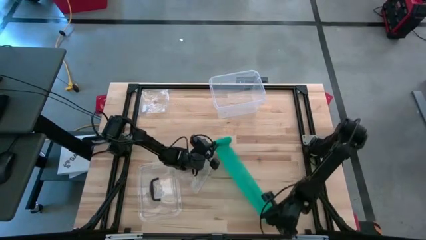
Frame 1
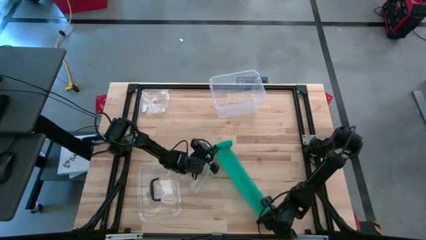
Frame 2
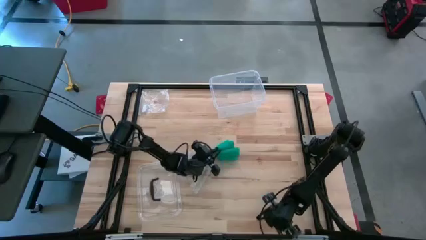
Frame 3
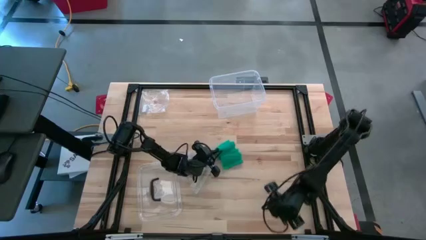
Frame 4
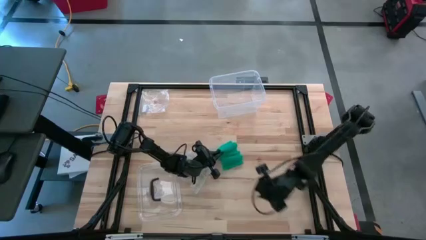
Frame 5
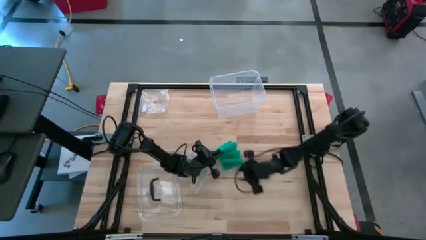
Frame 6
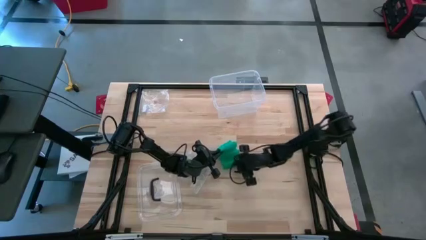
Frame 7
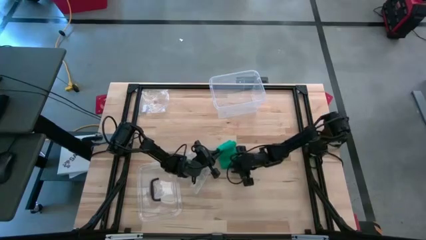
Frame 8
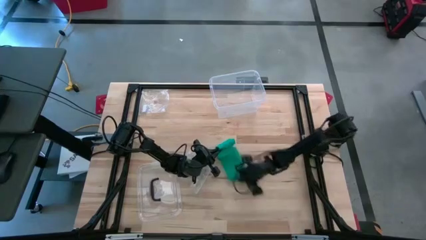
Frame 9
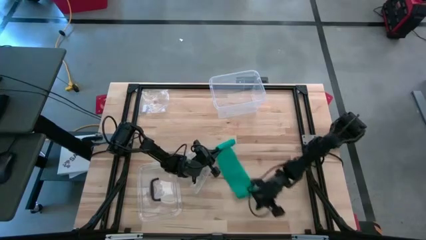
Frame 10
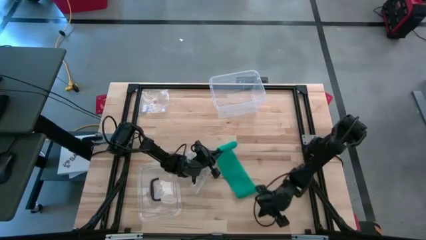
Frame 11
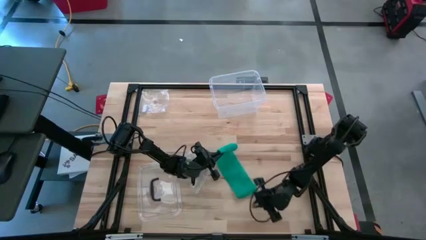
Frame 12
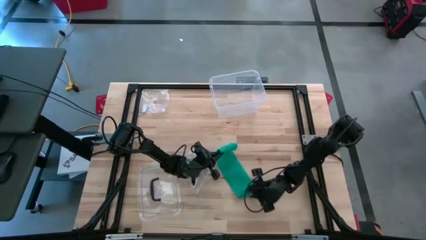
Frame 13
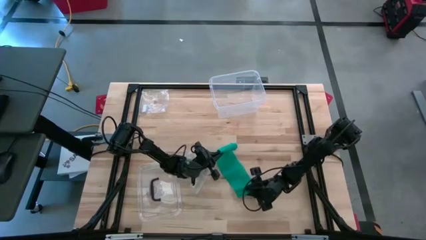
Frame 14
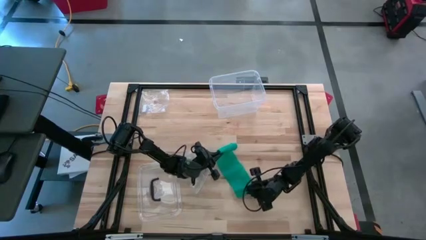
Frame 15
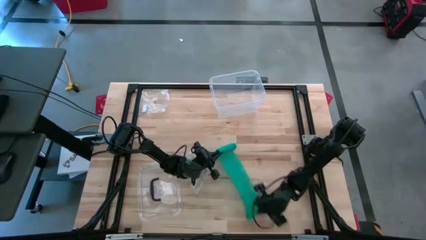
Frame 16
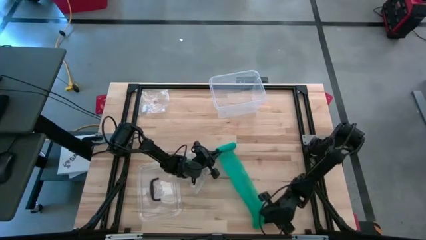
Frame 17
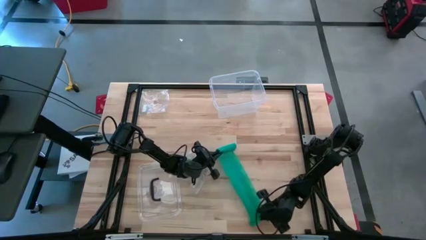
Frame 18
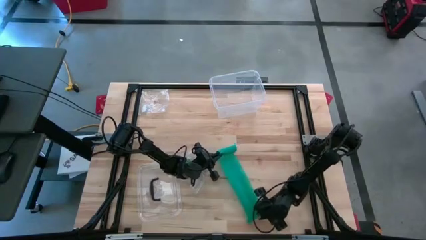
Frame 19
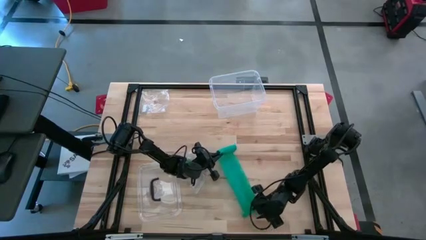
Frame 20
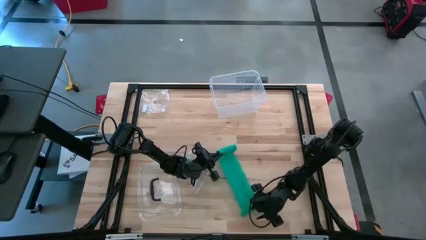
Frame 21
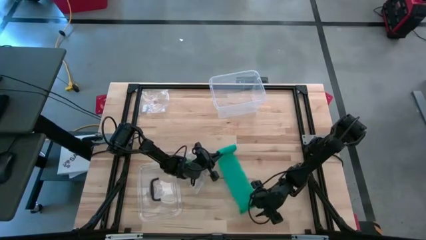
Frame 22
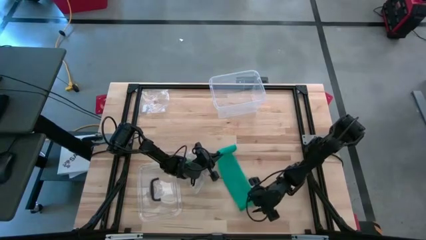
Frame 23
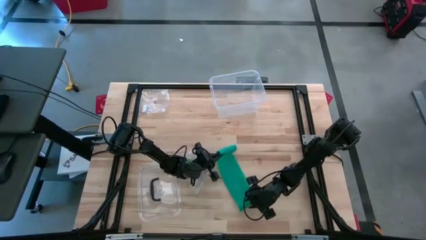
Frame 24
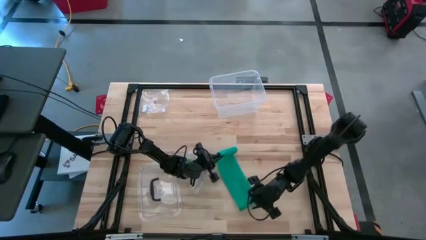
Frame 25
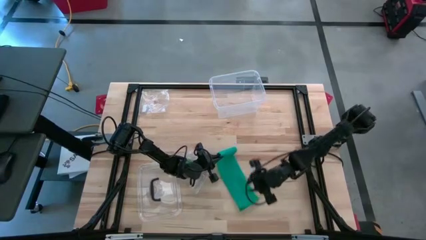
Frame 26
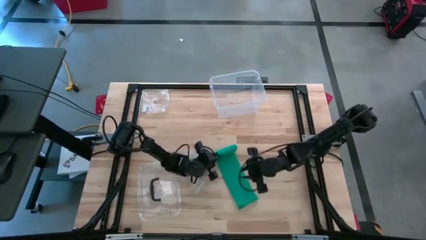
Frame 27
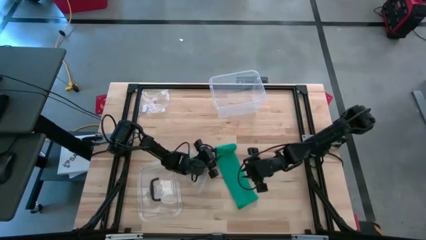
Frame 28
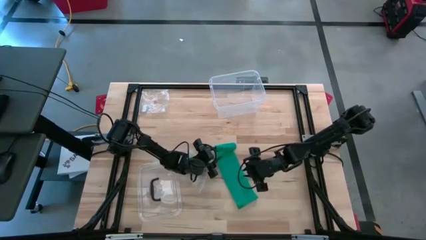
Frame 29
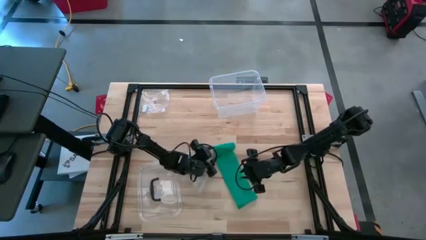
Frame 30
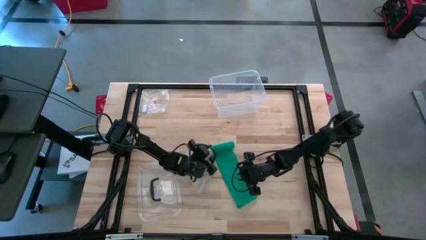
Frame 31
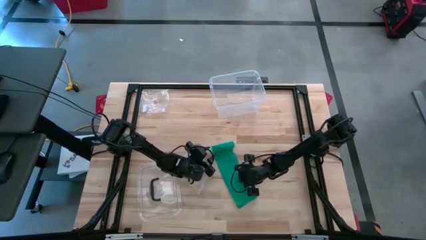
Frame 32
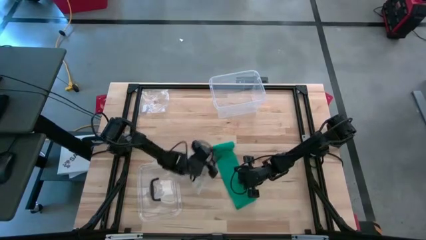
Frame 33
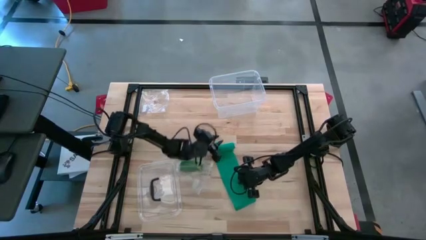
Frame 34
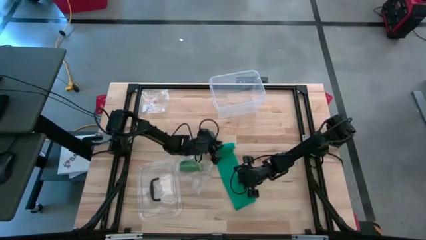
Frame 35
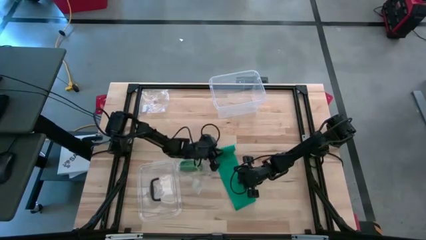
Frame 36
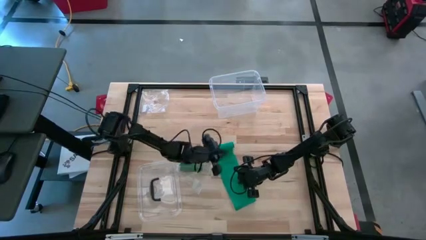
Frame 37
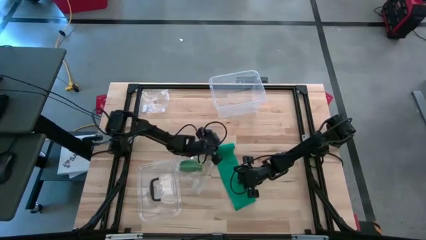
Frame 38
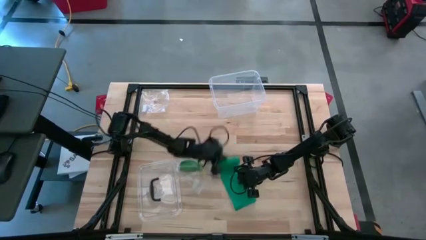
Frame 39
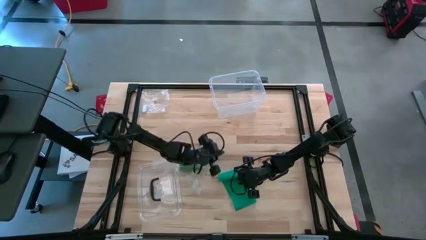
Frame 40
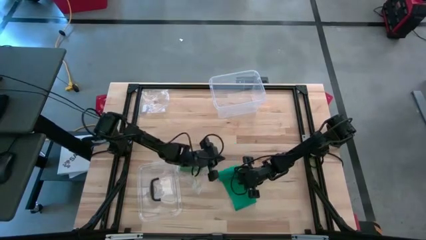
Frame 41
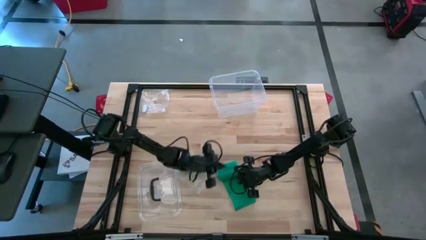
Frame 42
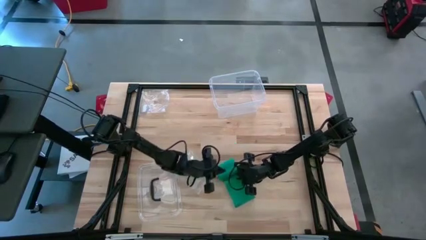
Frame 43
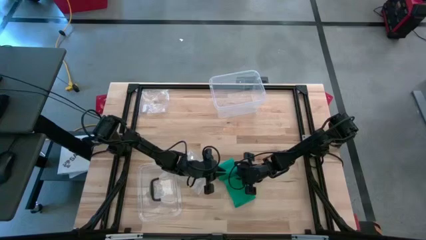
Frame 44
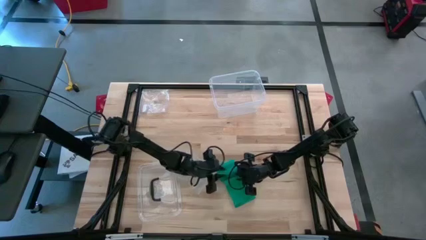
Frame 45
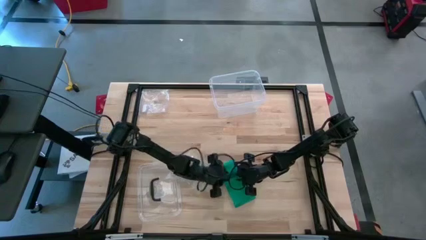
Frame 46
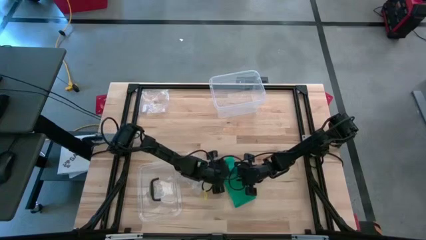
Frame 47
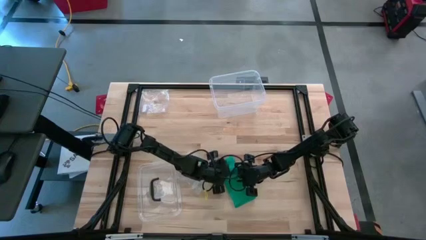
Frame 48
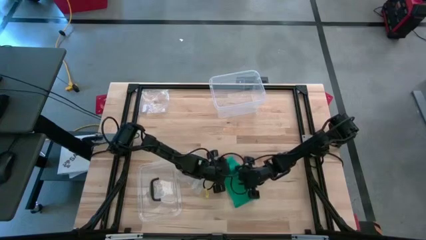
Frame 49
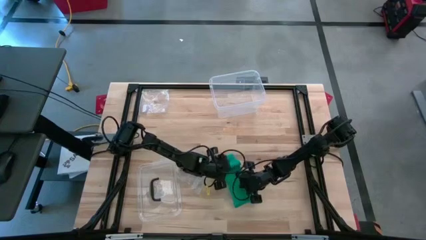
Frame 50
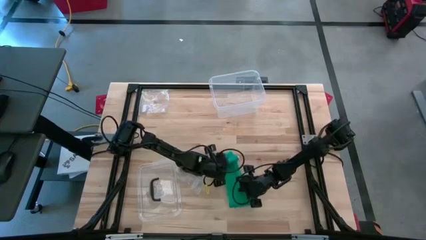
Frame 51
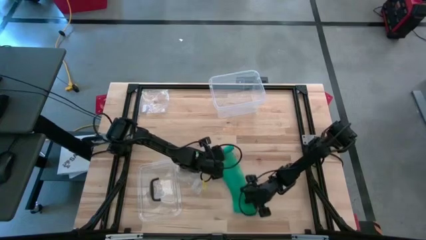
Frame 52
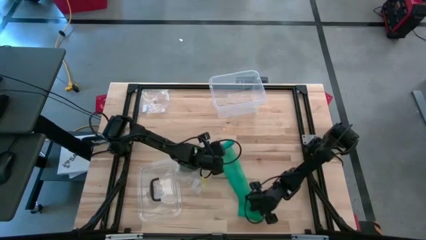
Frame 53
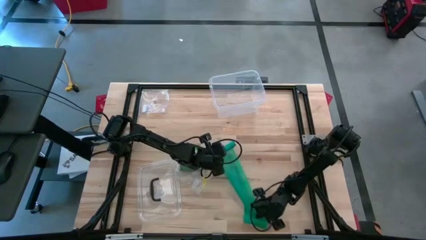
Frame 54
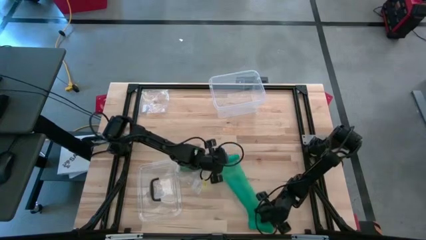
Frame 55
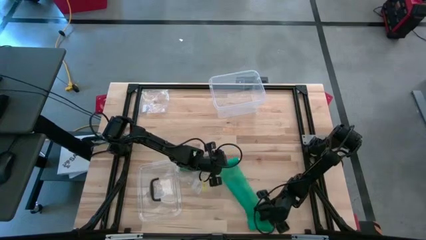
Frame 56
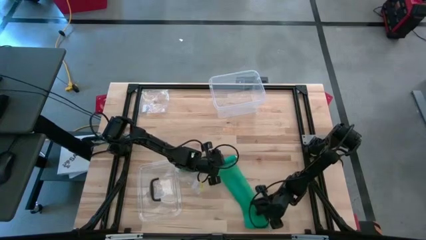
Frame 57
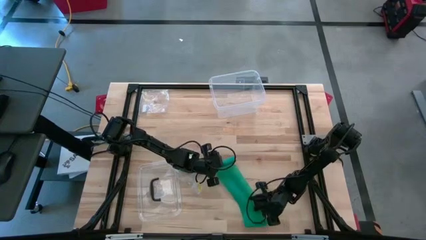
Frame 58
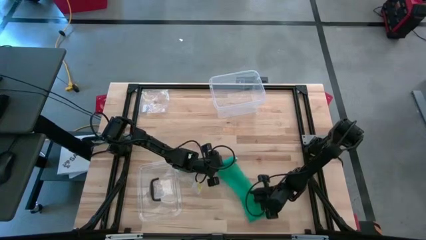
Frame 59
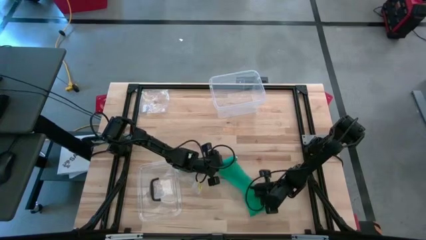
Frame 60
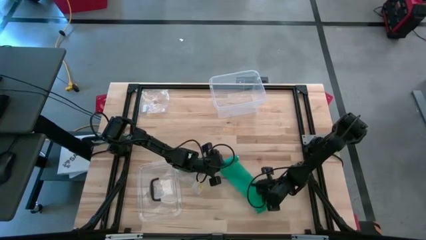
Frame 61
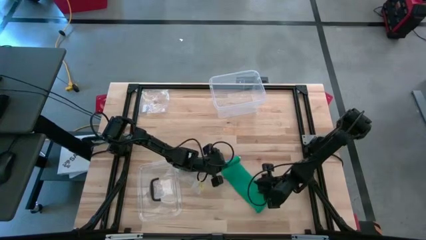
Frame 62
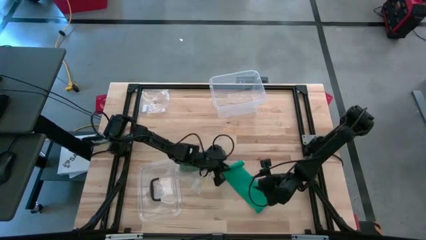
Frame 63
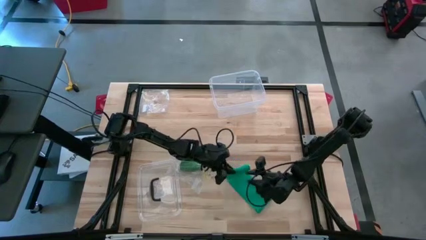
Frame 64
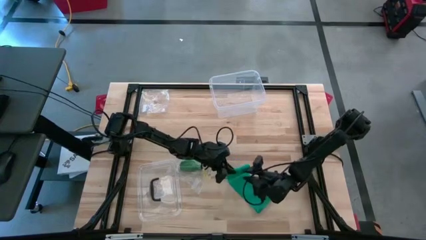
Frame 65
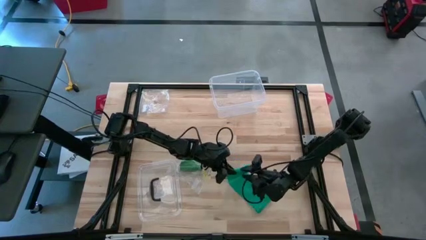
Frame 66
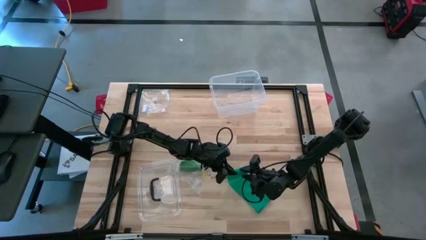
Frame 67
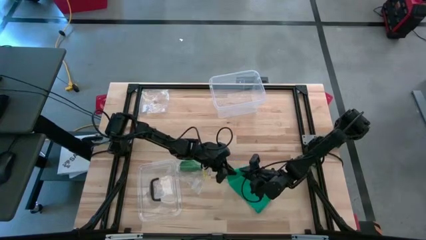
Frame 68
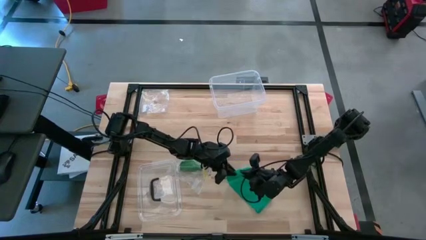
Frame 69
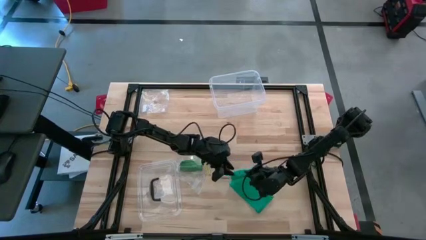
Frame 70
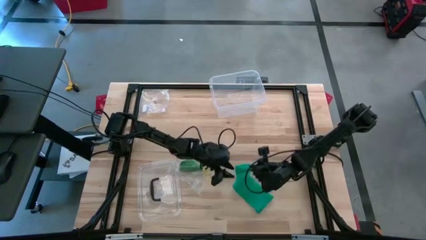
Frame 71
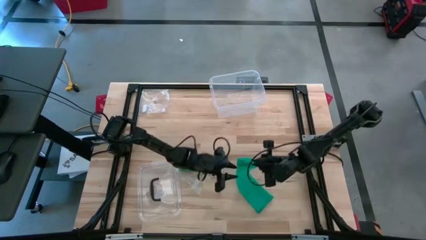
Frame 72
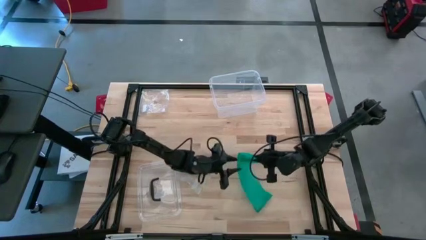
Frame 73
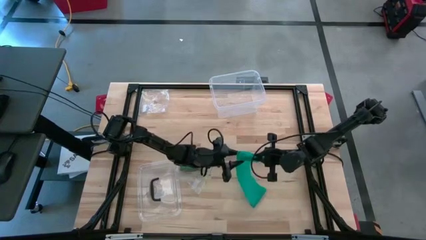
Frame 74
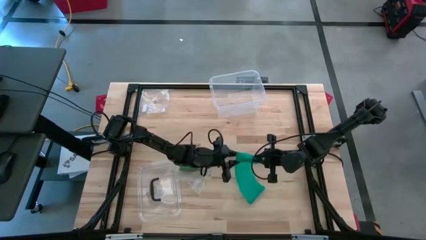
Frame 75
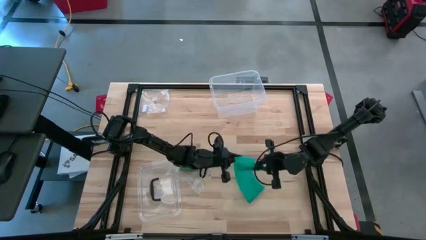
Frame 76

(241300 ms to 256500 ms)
Task: Roll bandage
Roll the blue bandage

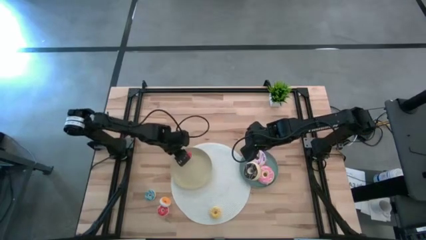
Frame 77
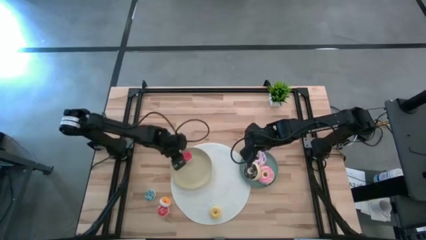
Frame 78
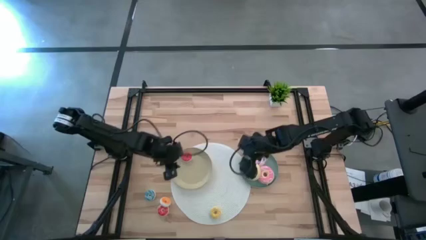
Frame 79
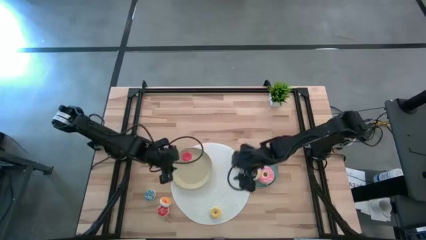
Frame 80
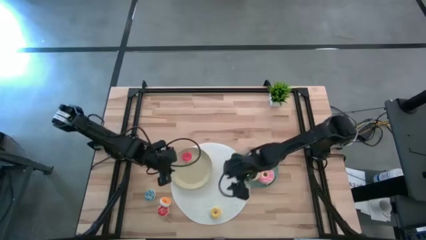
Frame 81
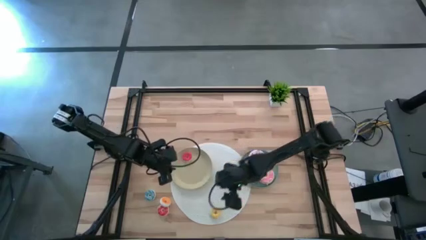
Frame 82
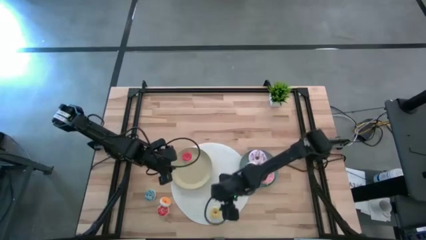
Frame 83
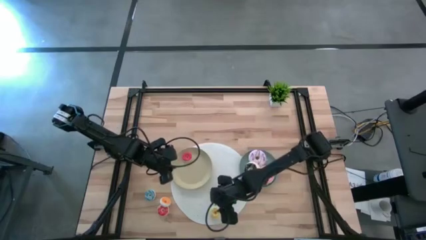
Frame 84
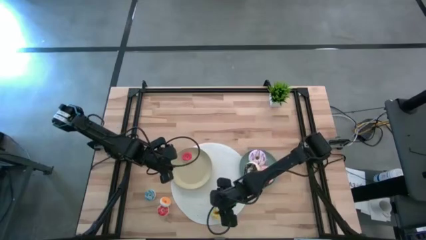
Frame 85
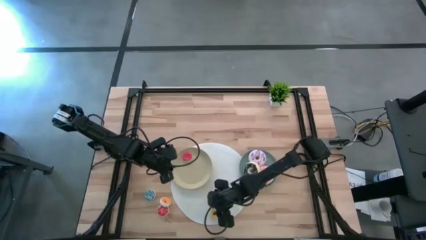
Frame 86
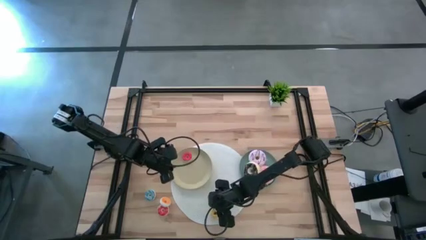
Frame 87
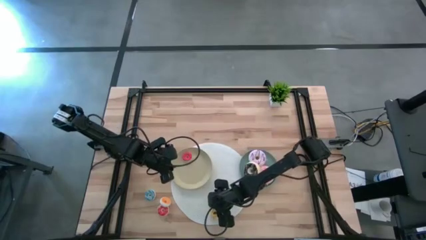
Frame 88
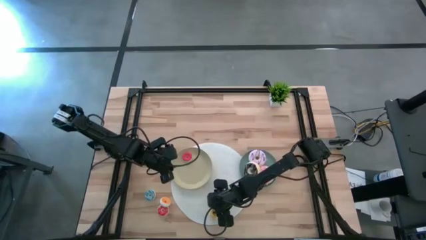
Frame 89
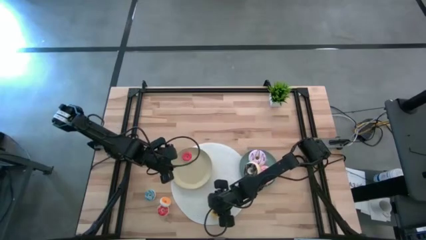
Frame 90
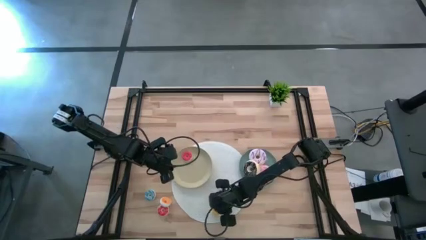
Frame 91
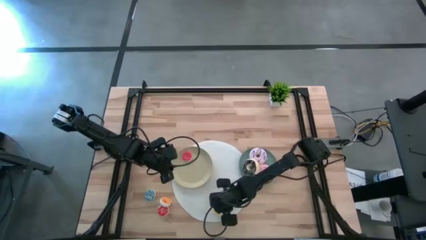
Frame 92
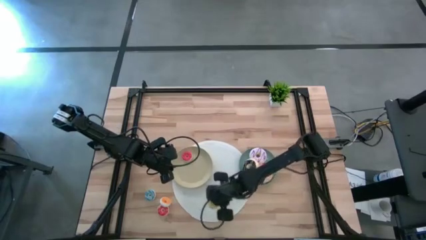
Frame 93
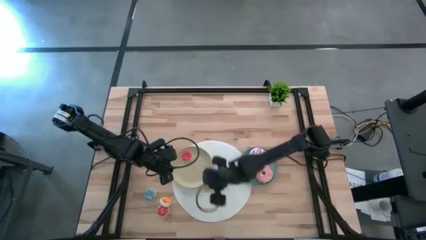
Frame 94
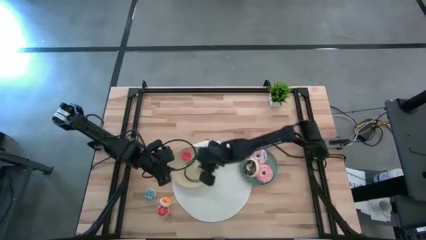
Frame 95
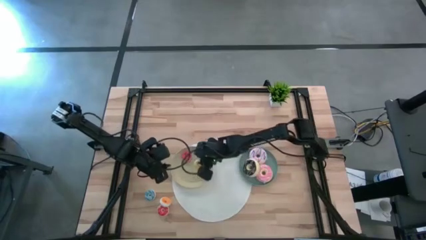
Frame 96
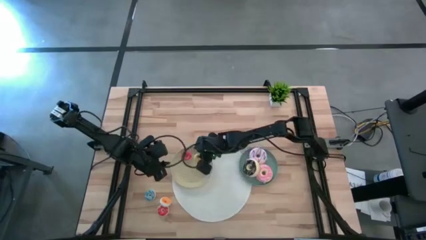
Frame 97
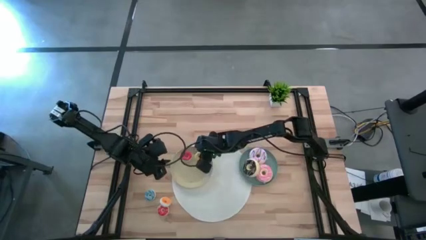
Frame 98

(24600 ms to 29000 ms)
Task: Pick & Place donuts
Put the small yellow donut on the brown plate
